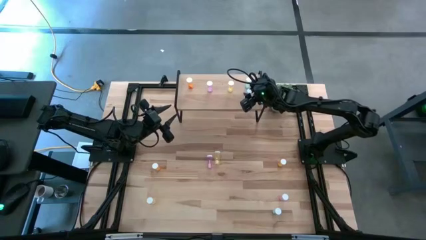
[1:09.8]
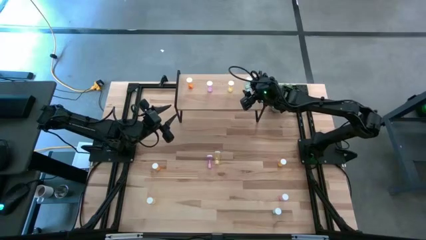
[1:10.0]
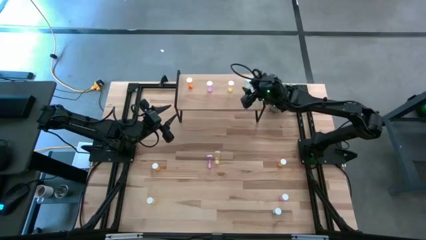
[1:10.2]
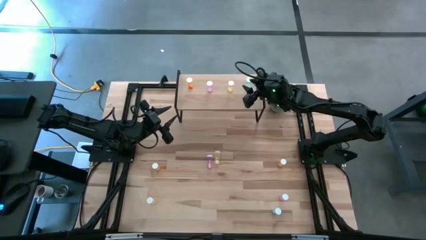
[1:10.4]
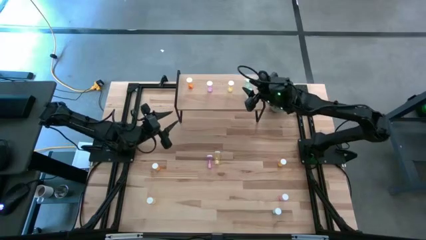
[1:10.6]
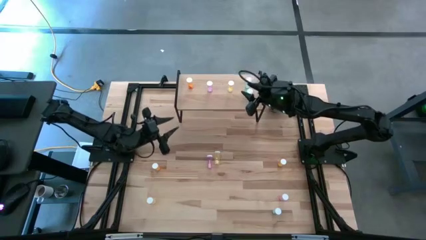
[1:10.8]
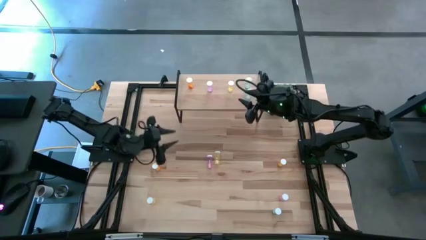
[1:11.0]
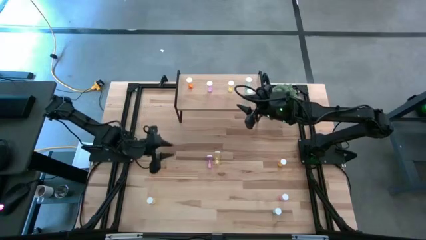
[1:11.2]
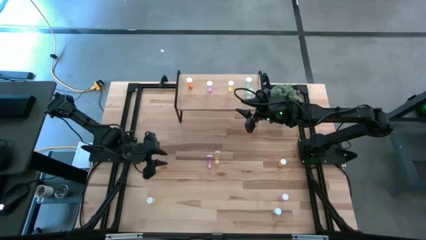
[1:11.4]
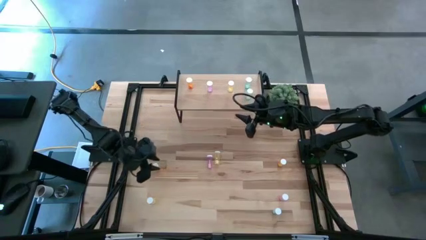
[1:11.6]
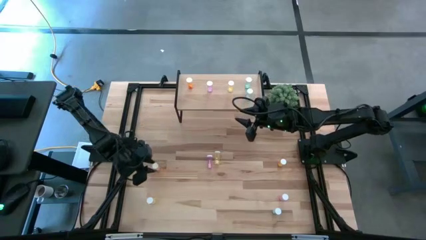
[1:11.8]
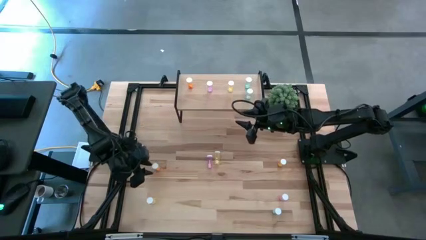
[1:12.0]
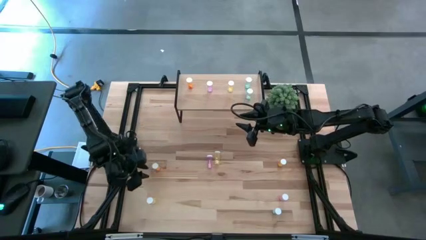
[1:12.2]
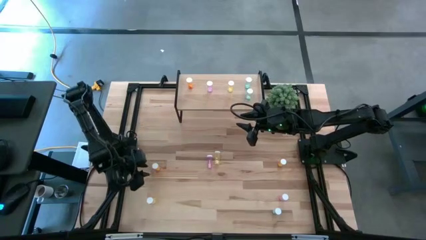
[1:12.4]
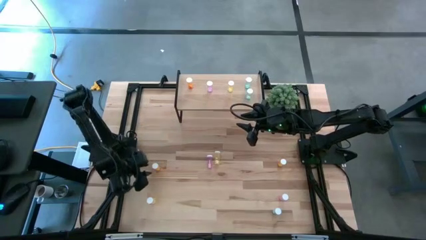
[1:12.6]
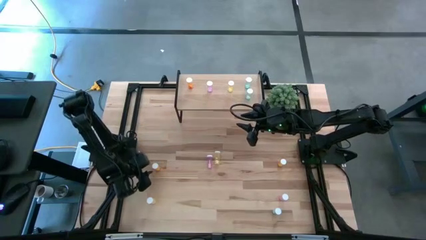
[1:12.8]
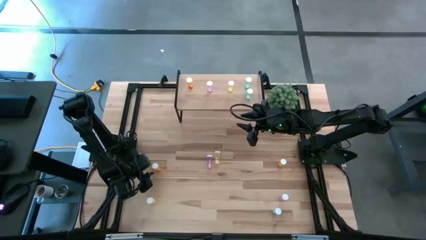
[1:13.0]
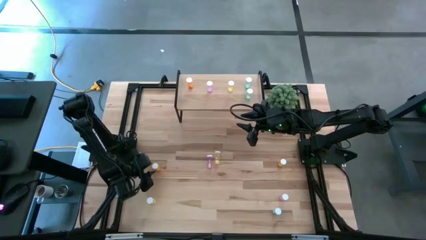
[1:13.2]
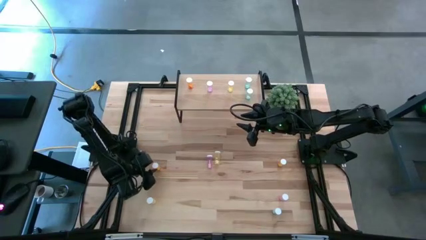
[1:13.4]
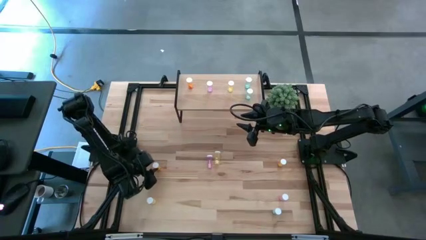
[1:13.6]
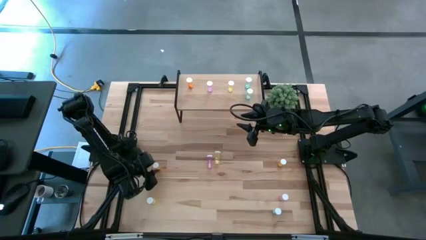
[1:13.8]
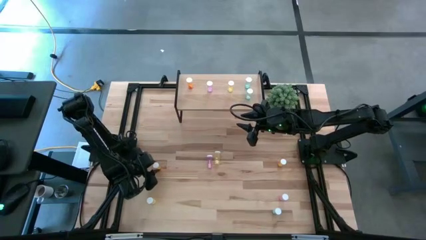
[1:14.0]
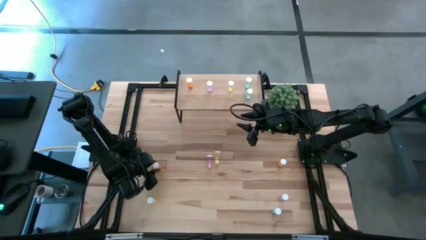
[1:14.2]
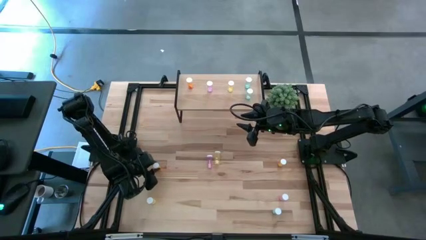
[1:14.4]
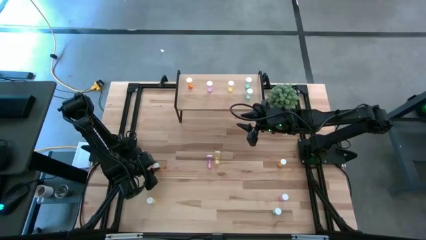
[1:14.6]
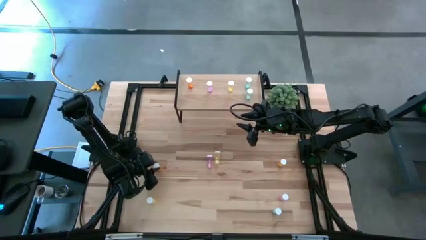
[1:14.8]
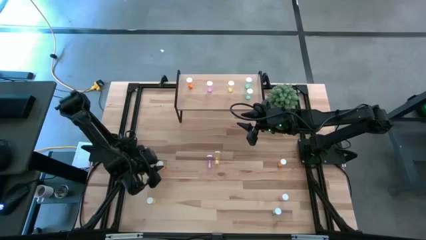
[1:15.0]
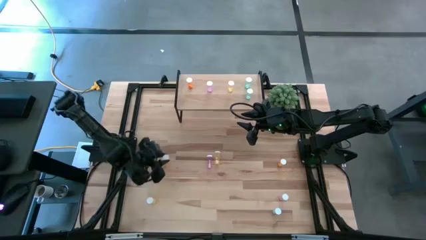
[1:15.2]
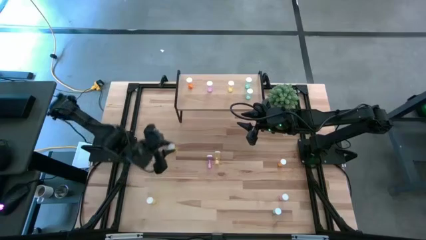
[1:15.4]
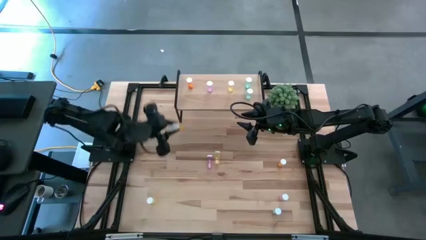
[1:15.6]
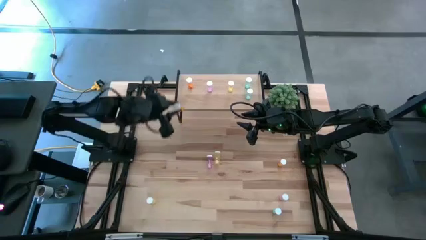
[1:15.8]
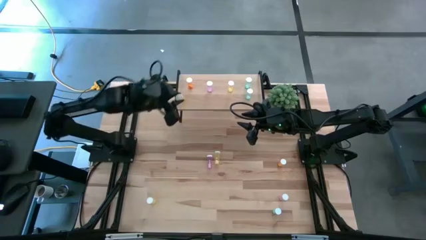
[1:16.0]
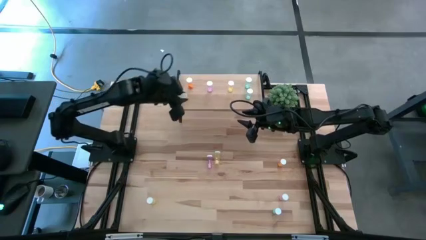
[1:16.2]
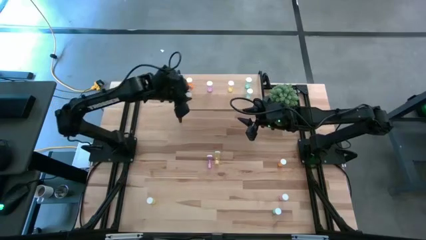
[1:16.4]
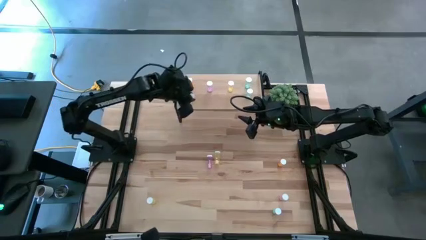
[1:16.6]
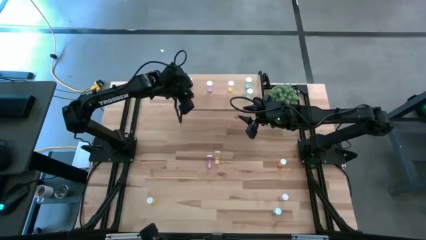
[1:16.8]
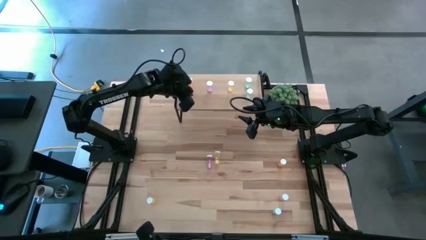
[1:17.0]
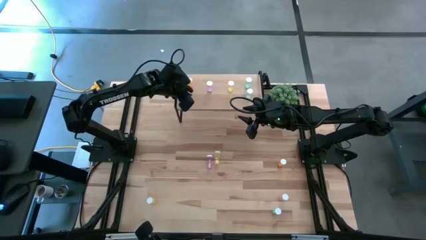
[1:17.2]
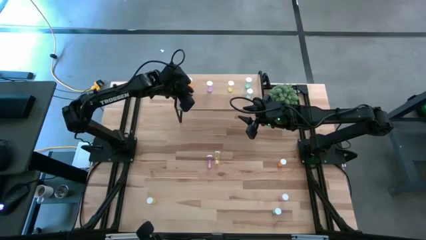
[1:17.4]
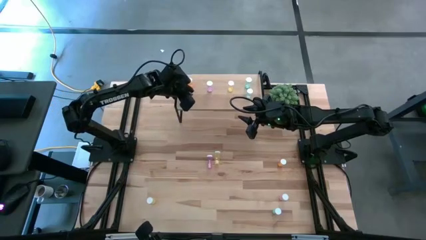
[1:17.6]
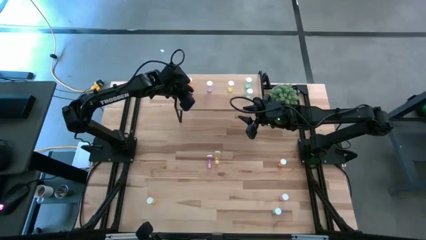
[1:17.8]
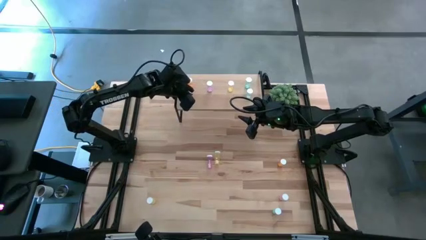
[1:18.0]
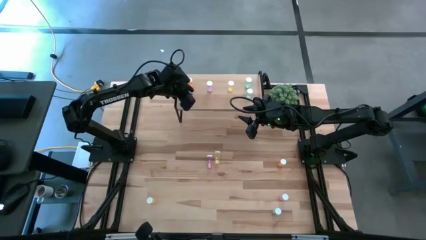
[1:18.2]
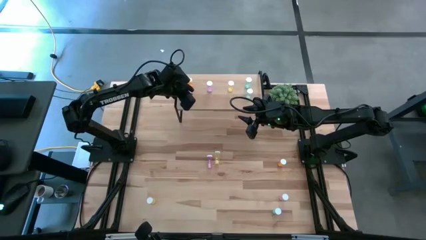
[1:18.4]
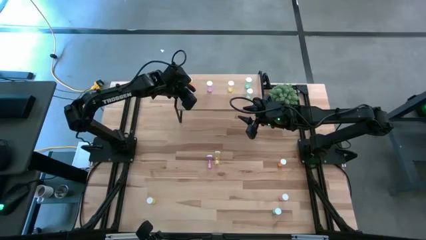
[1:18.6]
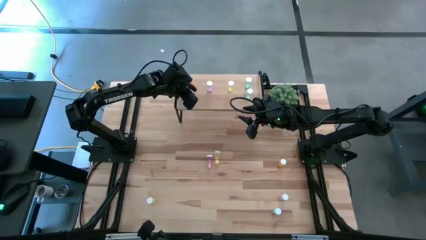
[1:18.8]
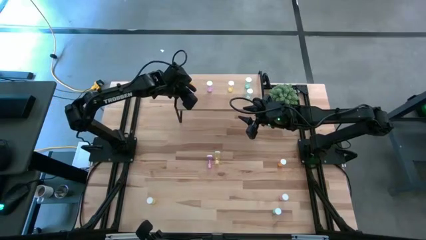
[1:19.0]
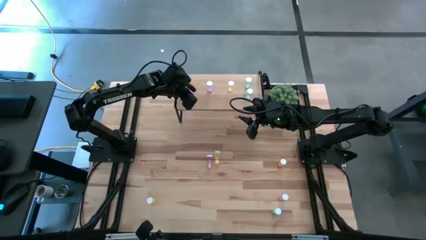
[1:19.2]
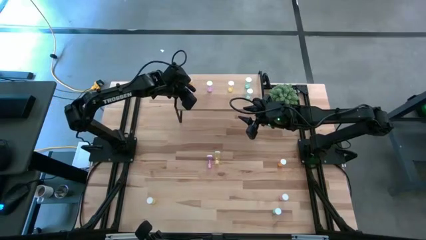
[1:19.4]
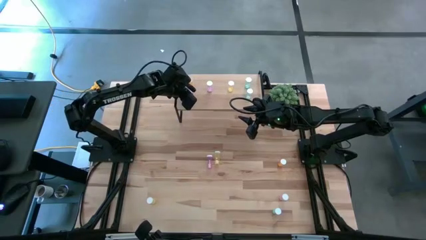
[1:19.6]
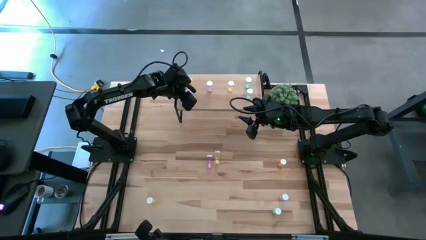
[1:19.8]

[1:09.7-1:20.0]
Task: Pick and place medicine bottles onto shelf by color
Put the left orange pill bottle on the shelf aligned with the other orange pill bottle

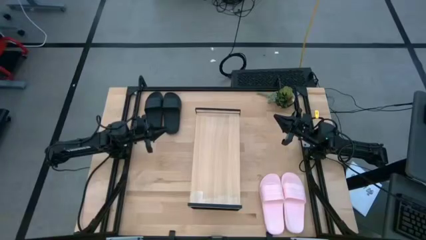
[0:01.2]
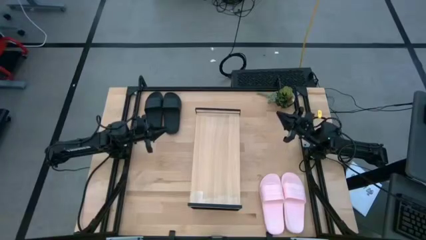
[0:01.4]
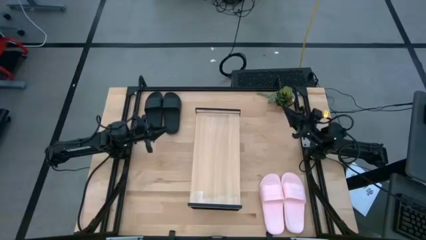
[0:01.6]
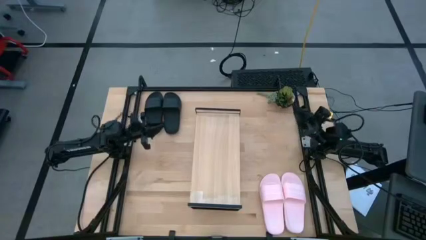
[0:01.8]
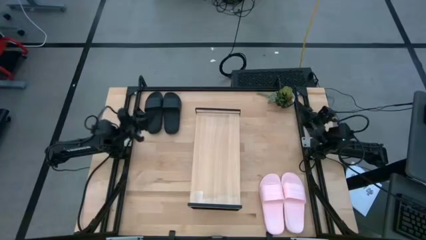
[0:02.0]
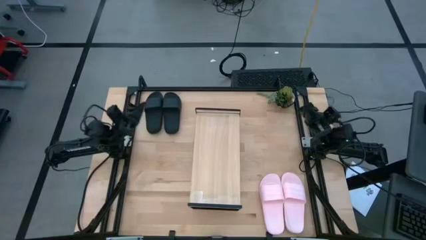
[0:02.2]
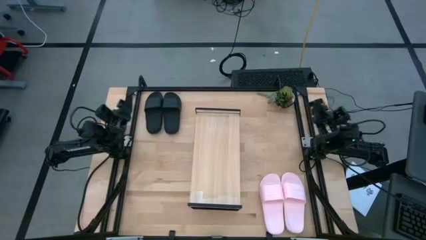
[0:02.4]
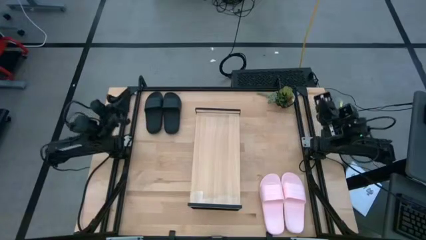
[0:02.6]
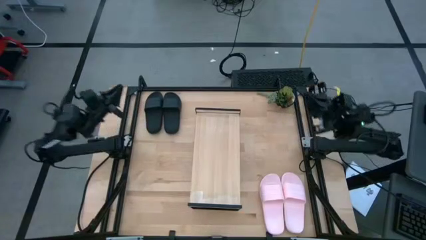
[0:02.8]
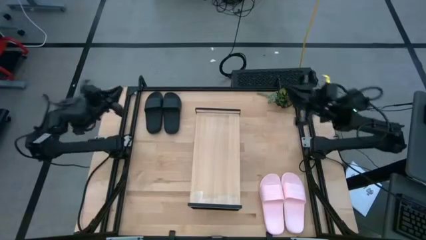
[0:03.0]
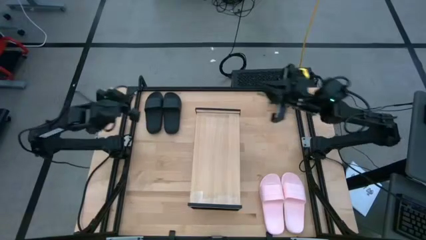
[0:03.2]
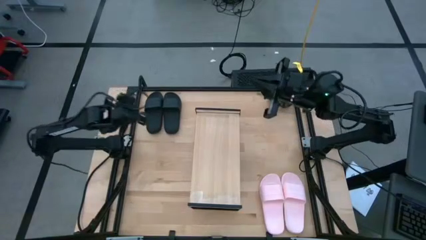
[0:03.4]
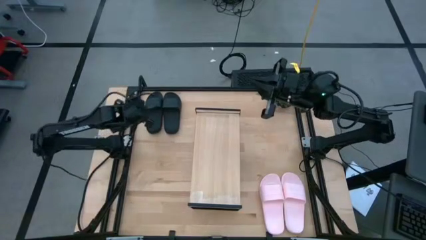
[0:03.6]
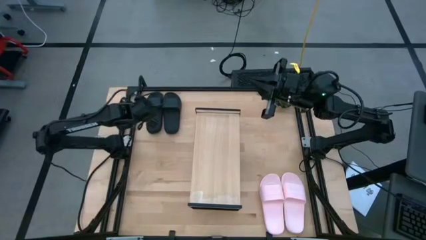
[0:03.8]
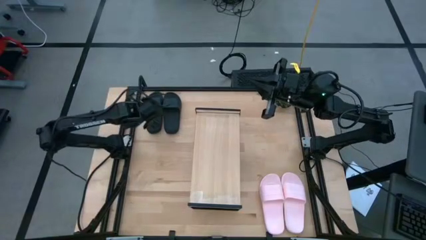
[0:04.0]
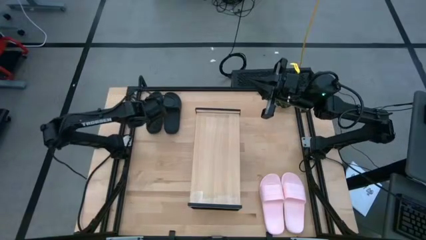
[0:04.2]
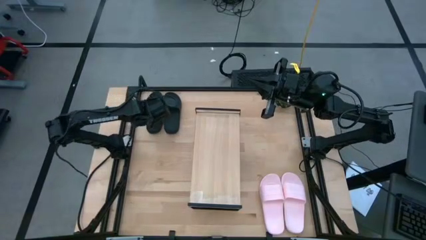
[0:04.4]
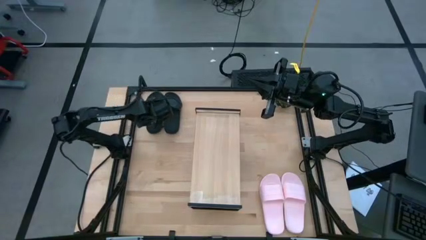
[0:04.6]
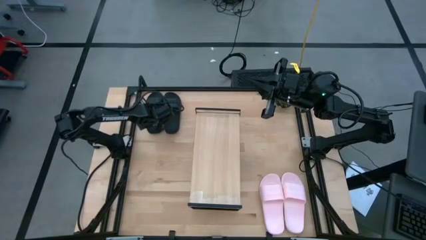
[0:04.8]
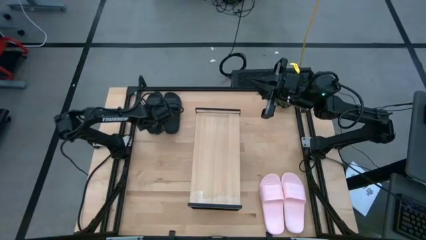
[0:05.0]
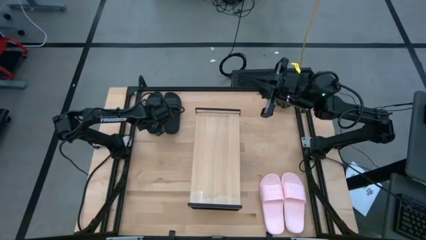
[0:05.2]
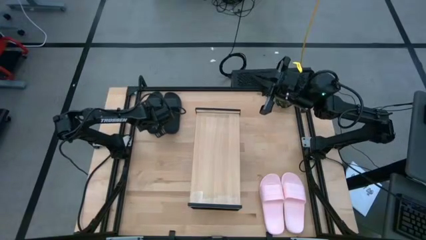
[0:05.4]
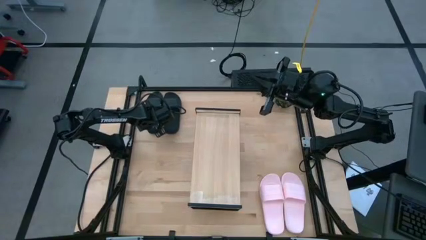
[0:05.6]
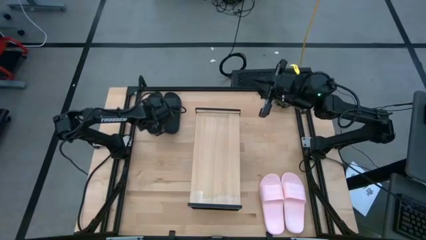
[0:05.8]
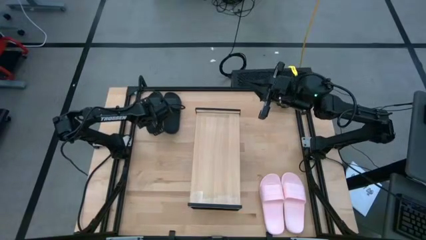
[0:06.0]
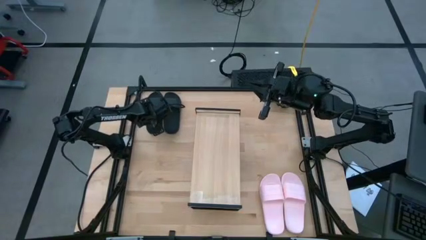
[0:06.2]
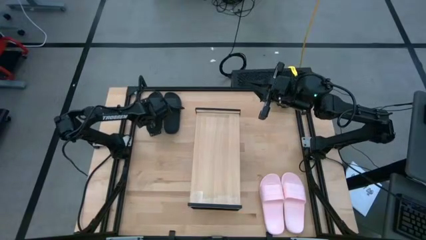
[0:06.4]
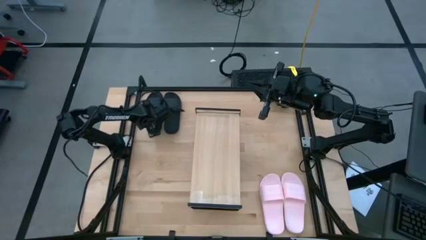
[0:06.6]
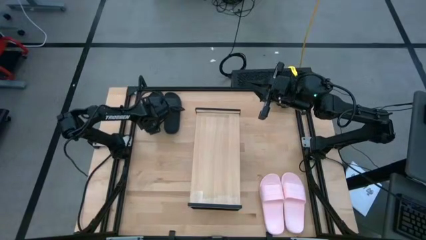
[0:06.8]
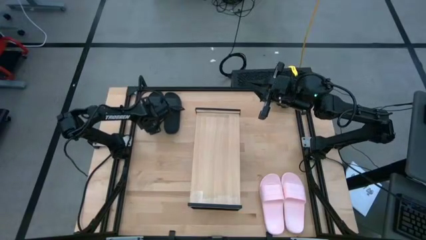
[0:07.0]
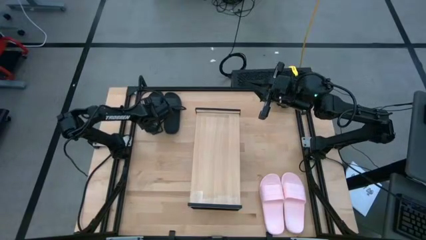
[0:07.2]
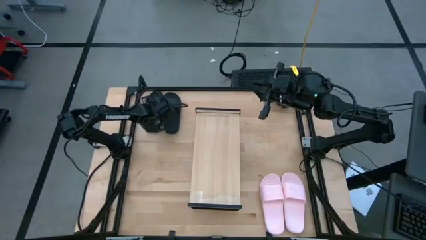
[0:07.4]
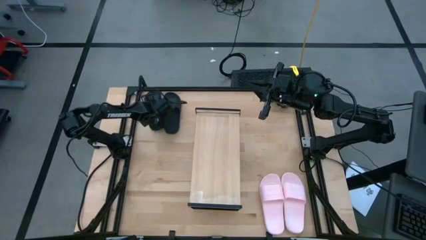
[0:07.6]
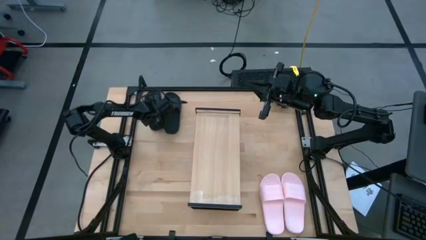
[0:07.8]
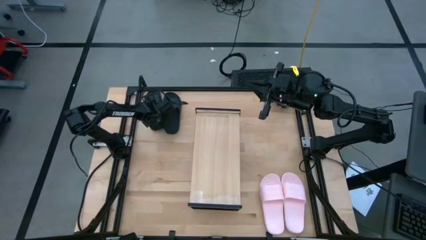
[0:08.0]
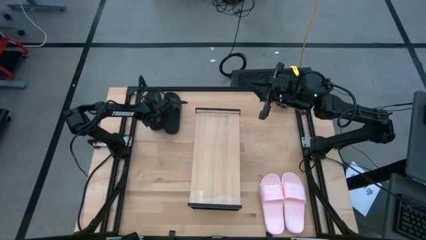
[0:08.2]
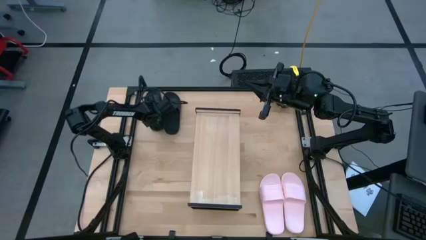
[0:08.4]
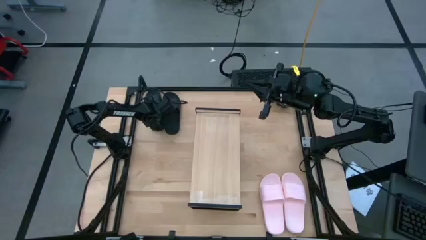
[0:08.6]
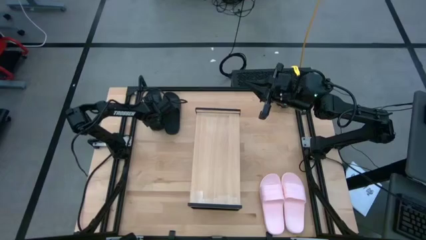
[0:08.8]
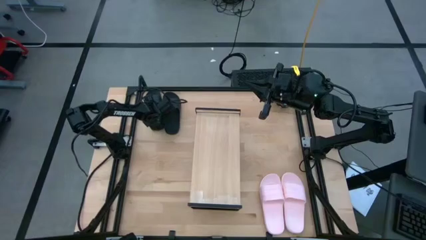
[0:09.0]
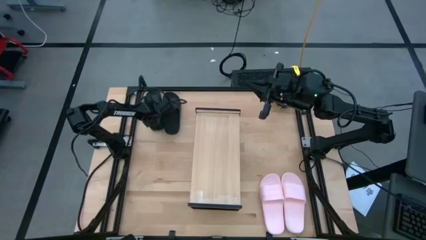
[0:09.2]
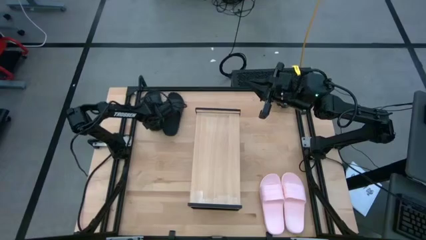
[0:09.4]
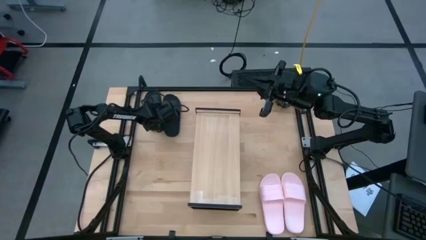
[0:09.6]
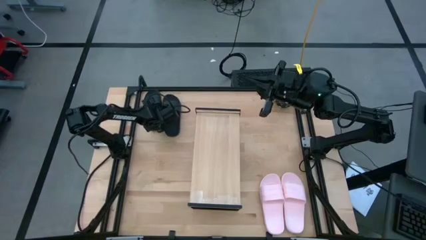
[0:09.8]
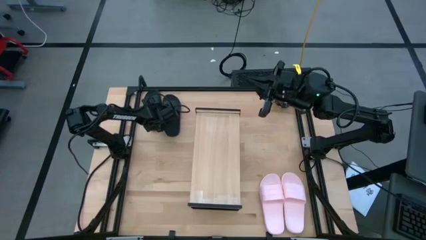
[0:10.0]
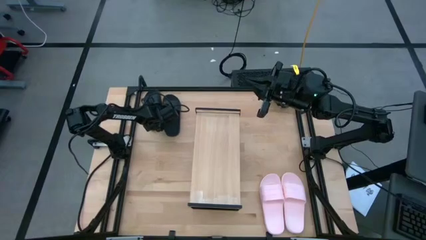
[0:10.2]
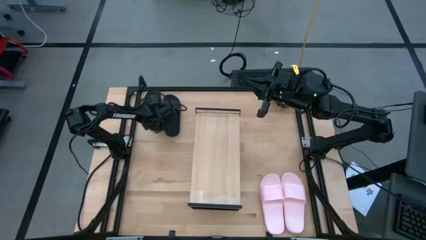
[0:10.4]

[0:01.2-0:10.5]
Task: Pick and place slides into the shelf
Put the left black slipper on the shelf
